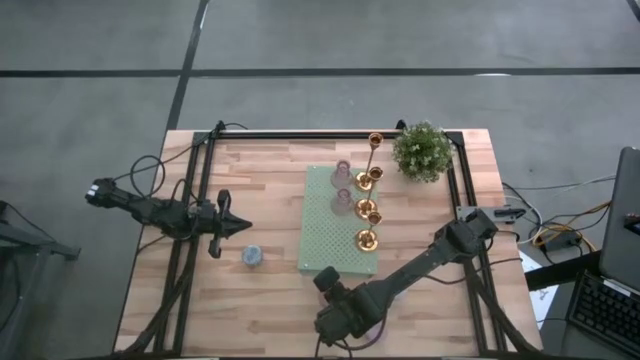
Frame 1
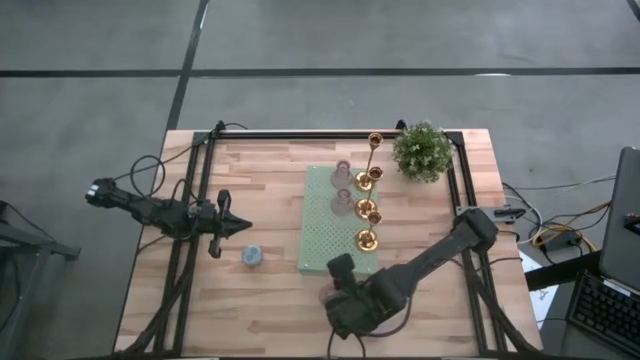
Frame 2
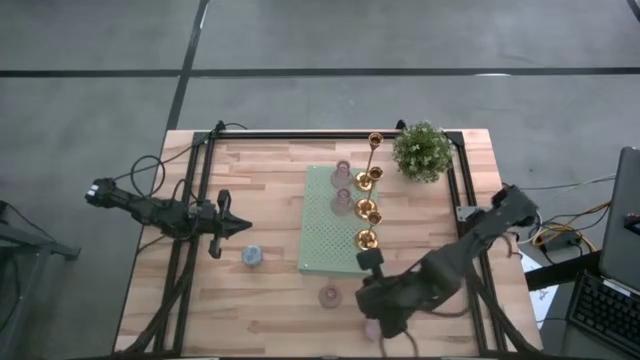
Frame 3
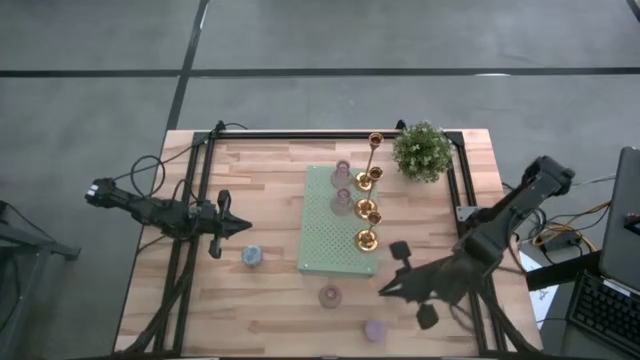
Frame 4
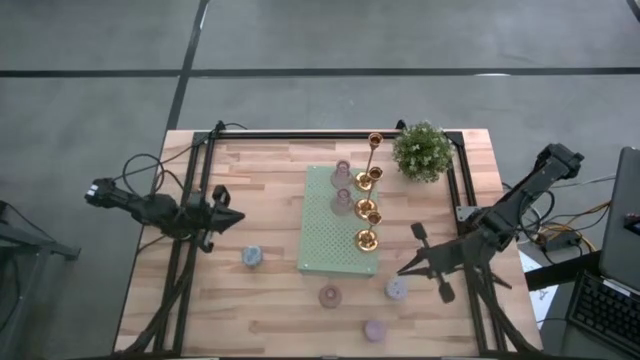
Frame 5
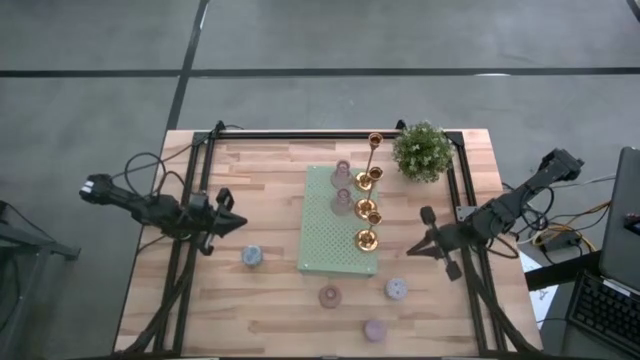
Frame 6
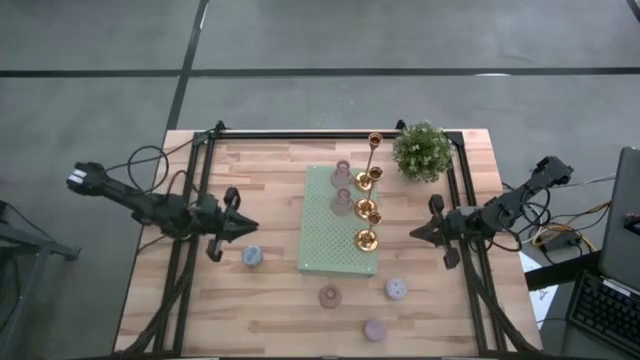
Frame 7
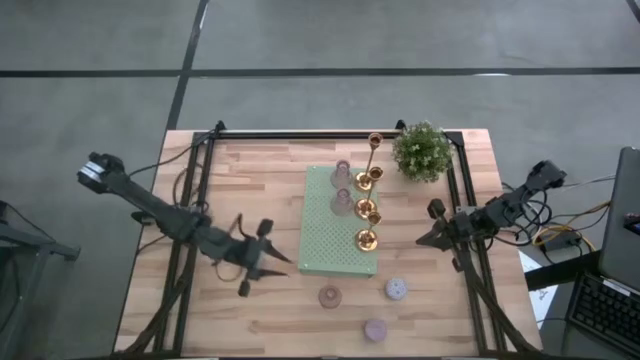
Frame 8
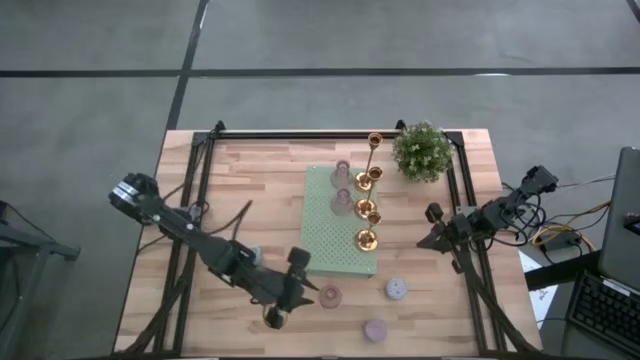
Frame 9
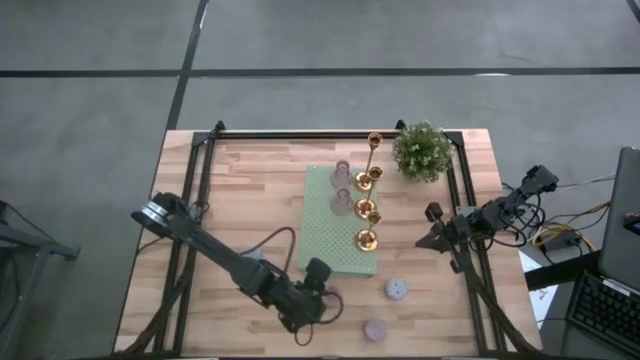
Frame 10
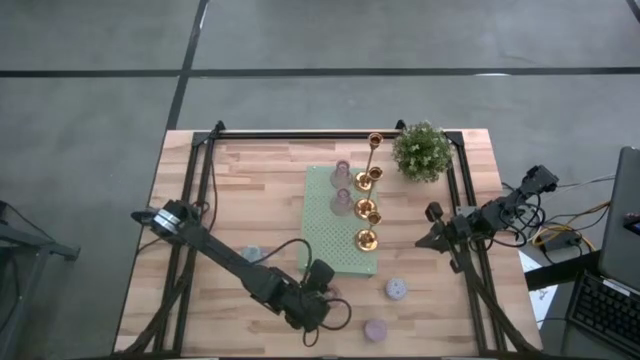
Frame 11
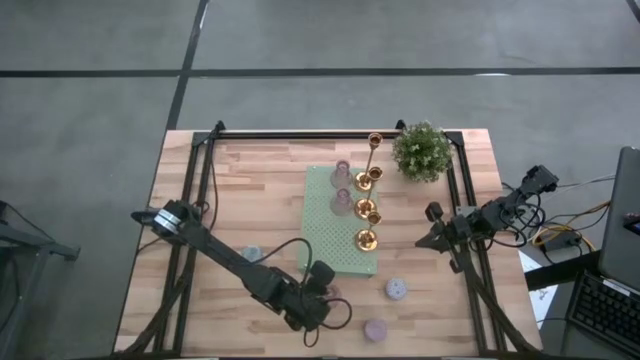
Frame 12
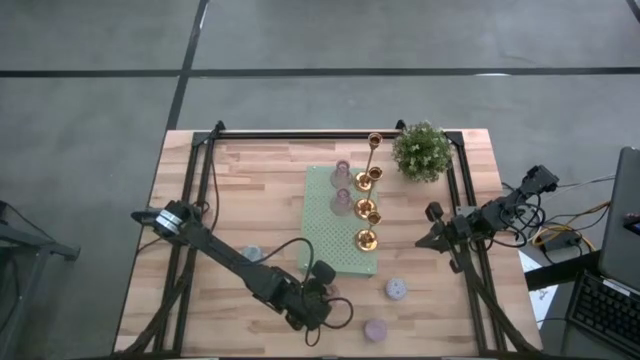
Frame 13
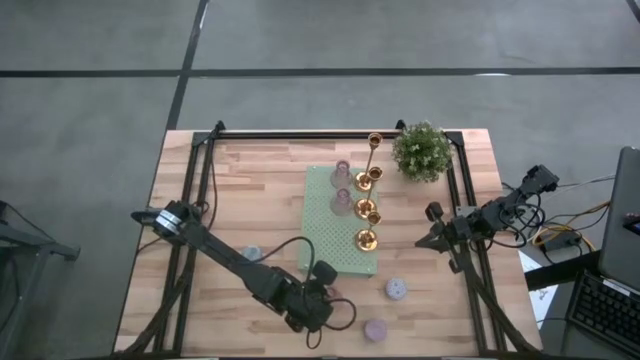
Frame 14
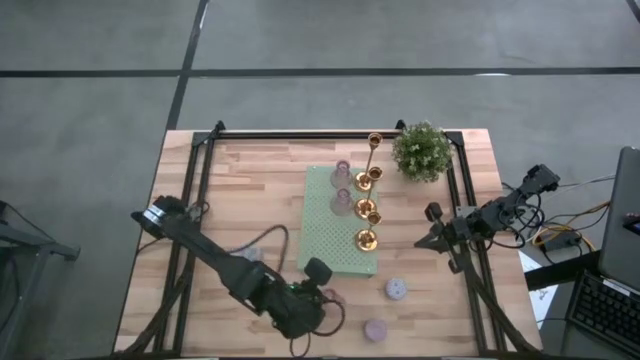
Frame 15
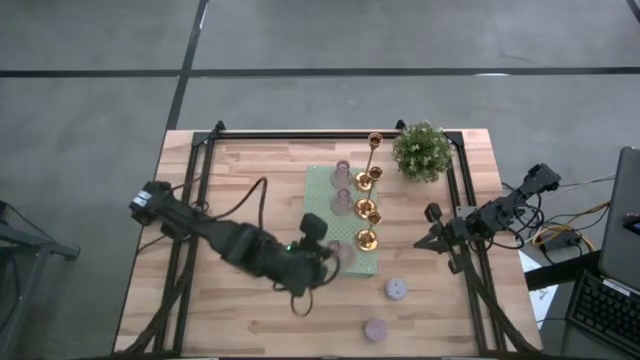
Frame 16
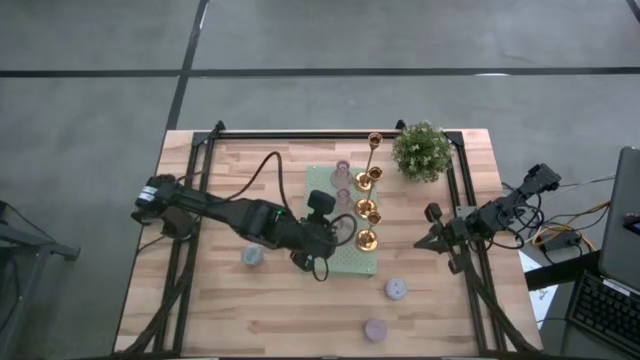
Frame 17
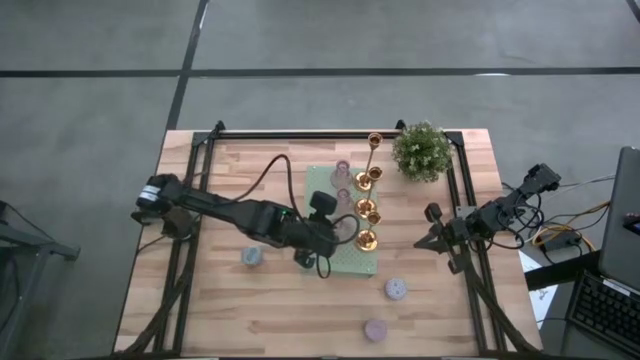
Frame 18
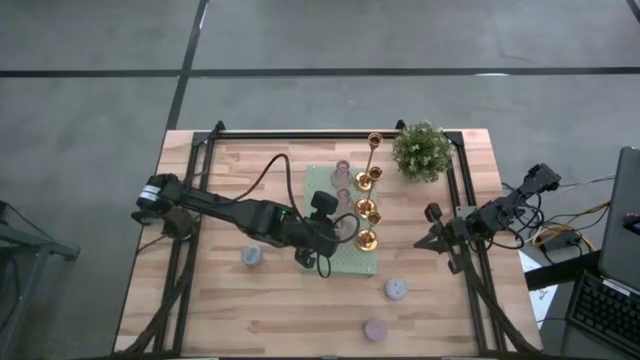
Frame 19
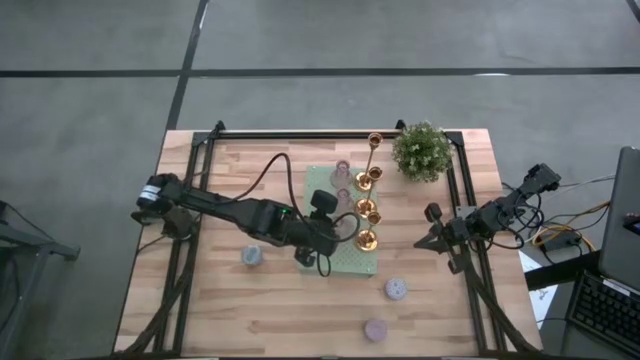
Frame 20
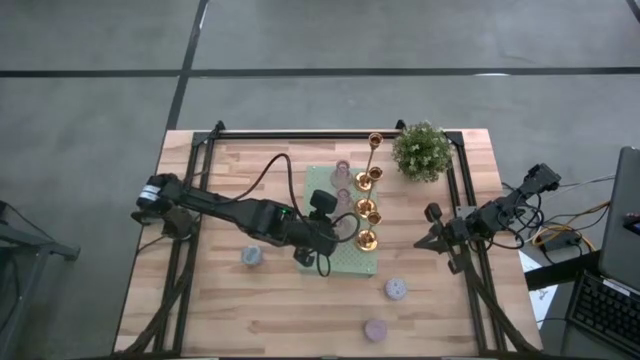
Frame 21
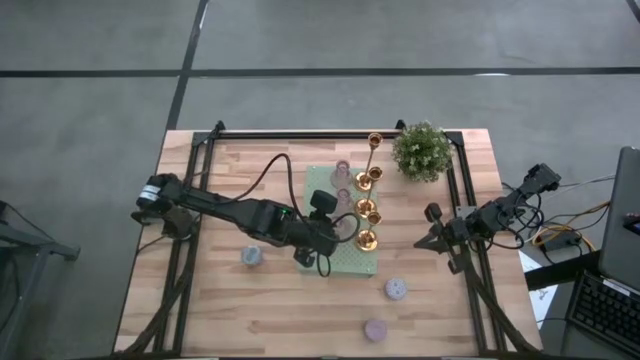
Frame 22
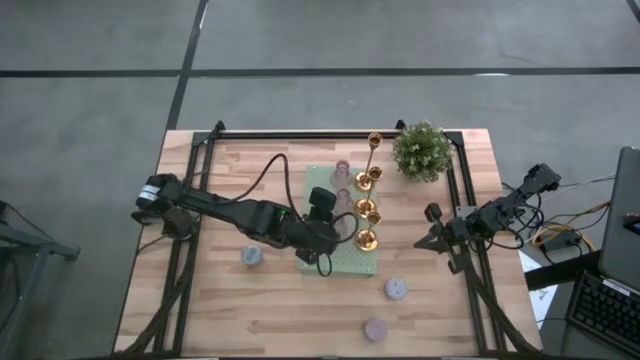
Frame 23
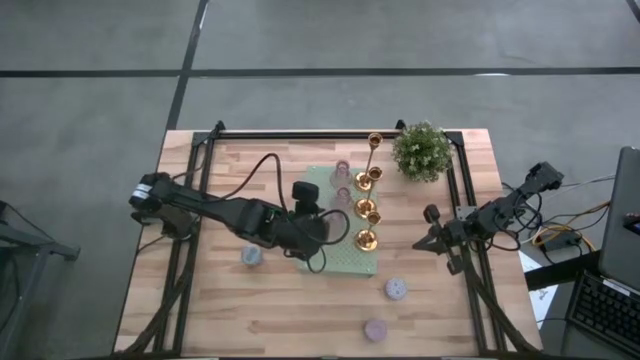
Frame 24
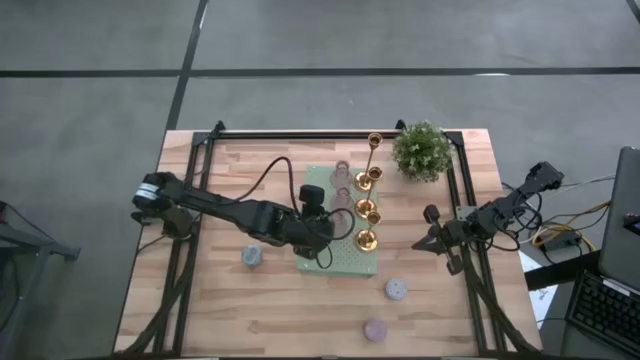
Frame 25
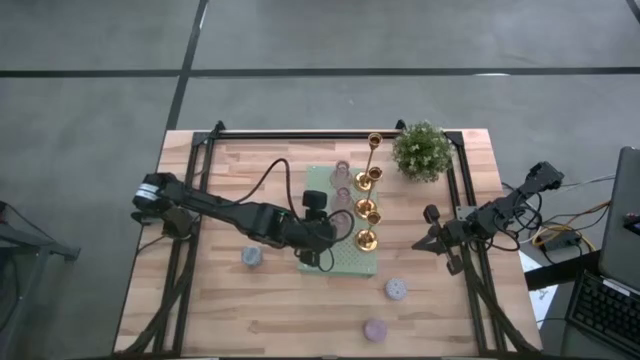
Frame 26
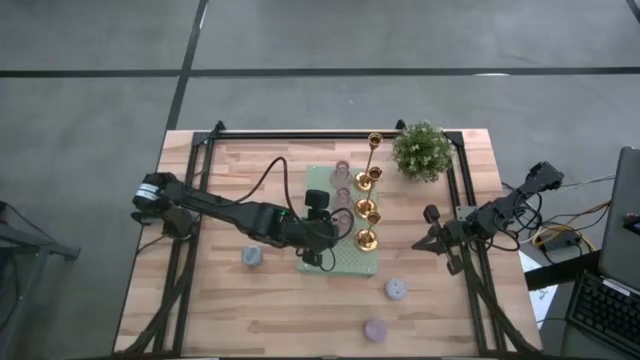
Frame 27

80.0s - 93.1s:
Task: Pick & Place candle stick holders
Put the purple vase on the shelf aligned with the other purple vase

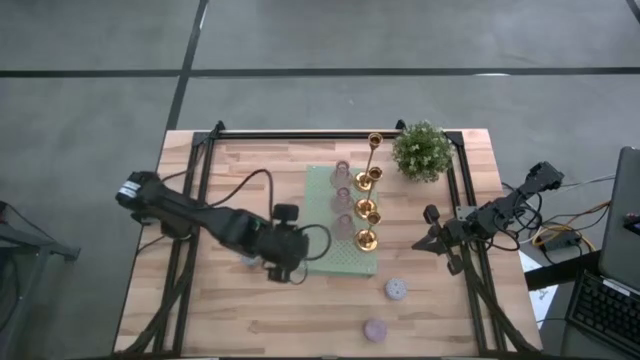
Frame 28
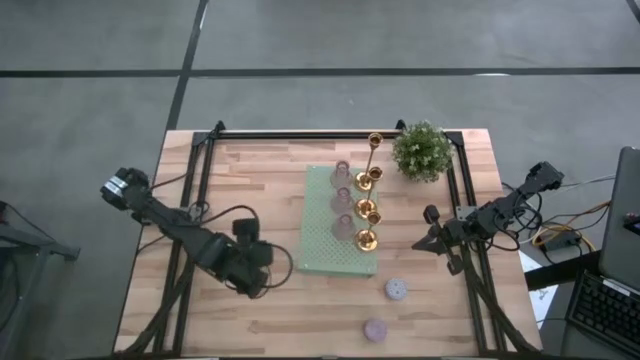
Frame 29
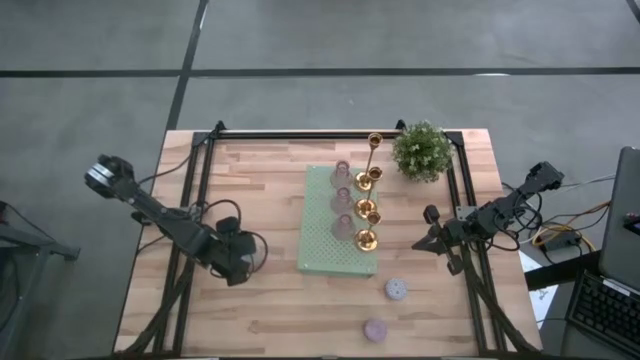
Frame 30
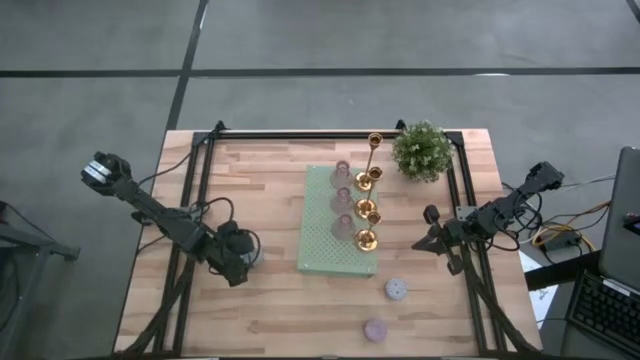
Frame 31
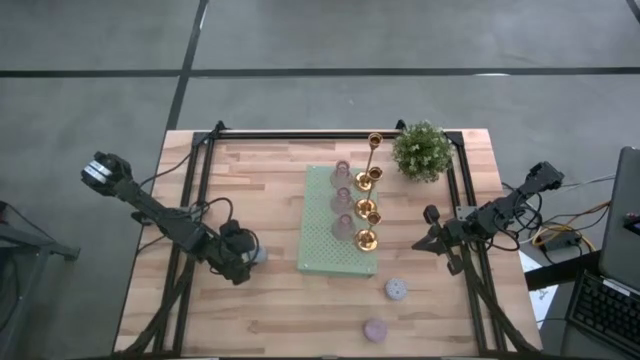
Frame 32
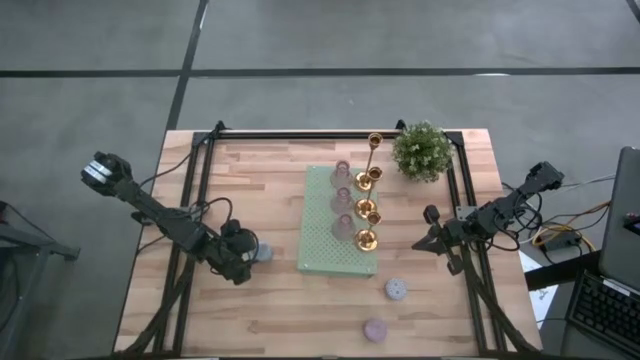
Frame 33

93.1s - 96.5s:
Put the blue patterned scented candle on the shelf

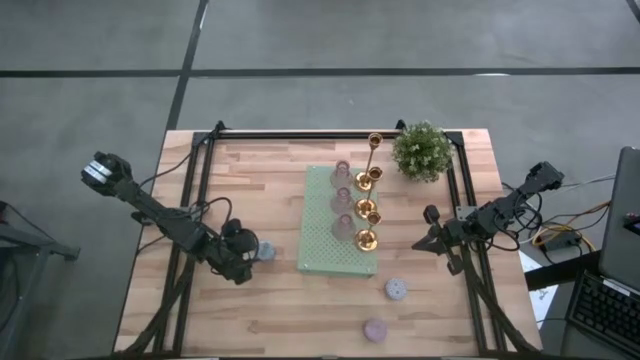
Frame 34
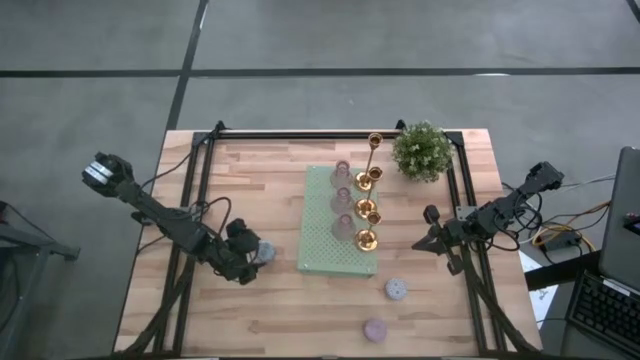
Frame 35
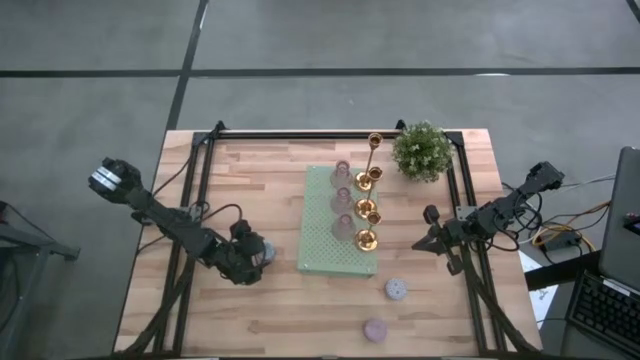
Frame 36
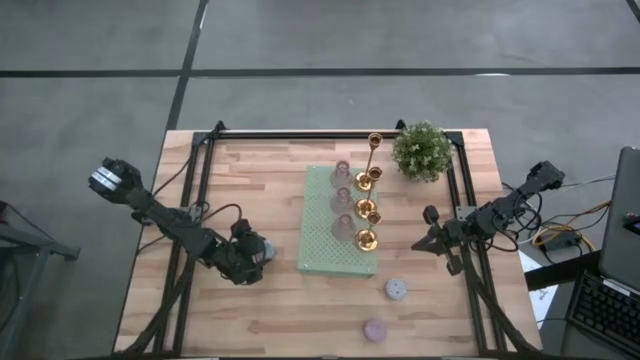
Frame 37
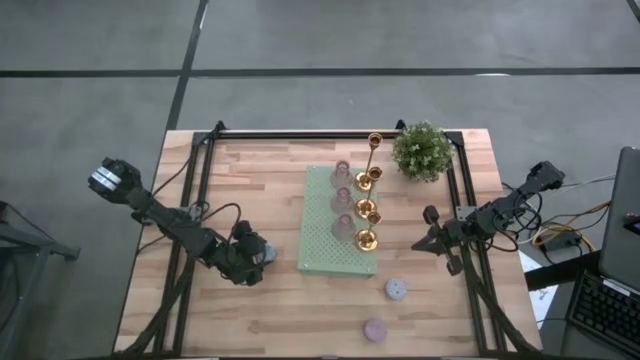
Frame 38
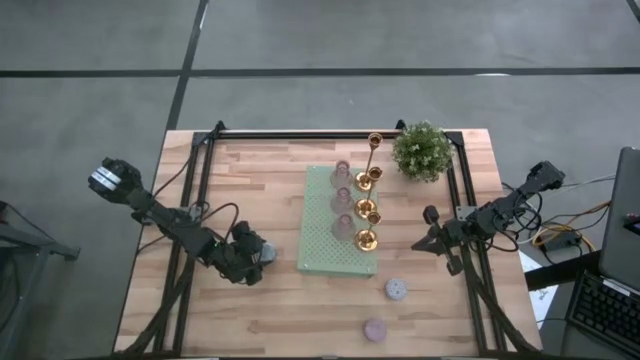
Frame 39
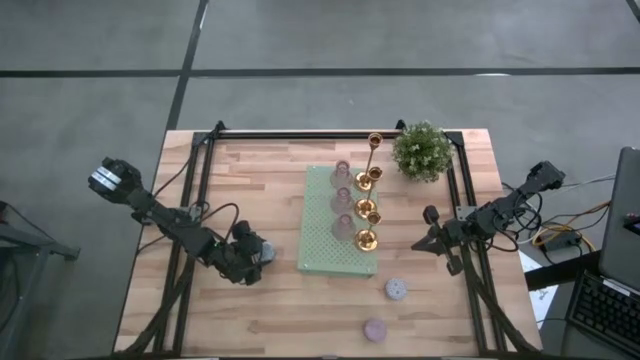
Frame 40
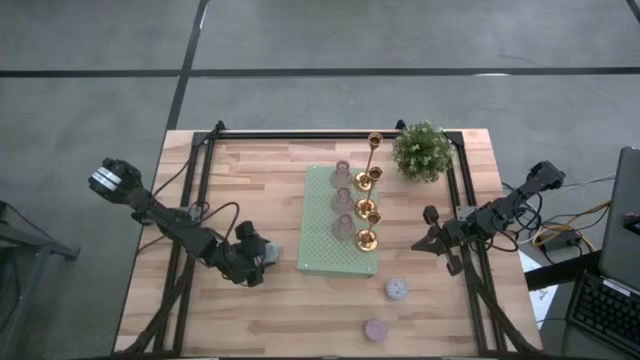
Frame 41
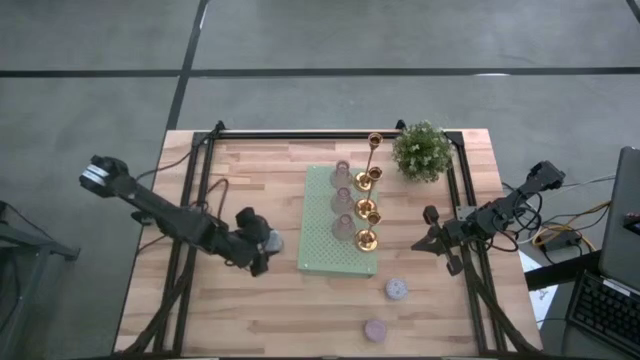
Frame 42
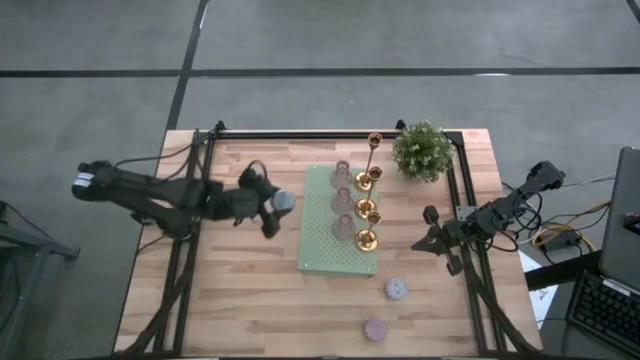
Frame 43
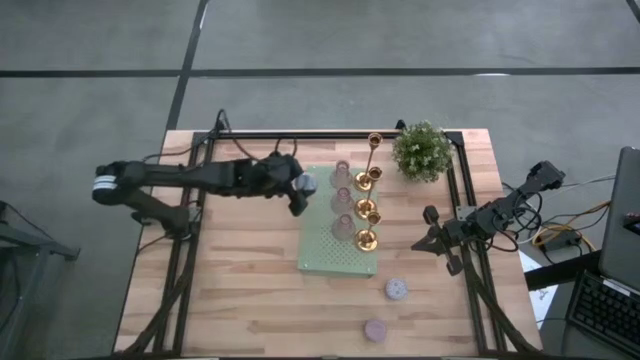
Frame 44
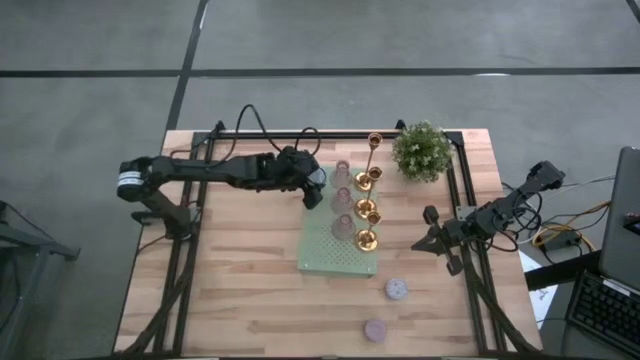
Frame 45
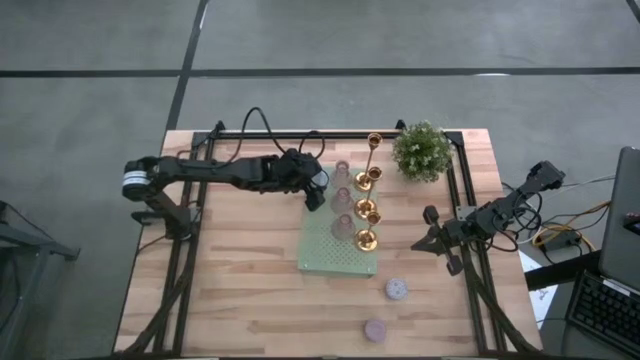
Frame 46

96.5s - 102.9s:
Put the blue patterned scented candle on the shelf
